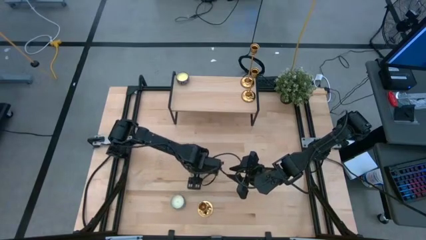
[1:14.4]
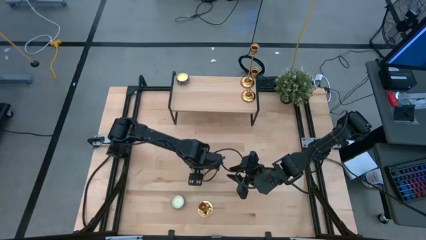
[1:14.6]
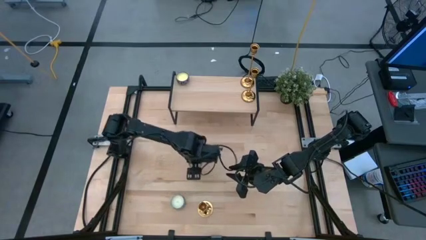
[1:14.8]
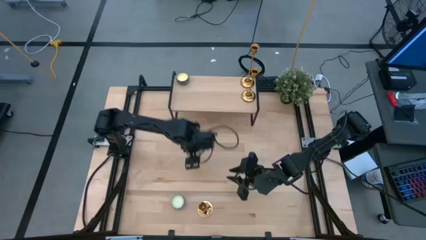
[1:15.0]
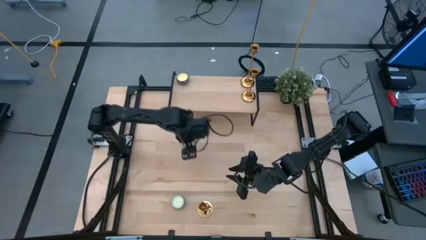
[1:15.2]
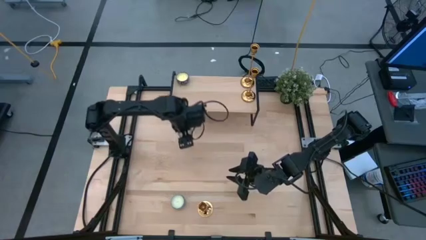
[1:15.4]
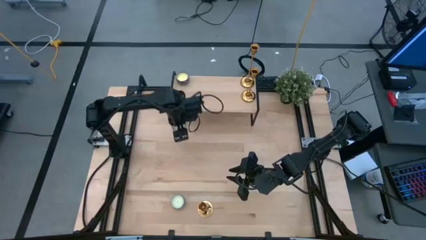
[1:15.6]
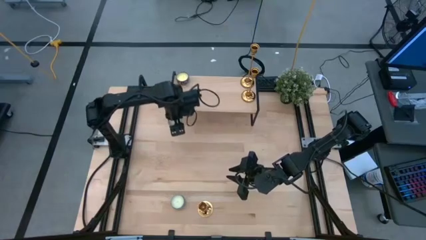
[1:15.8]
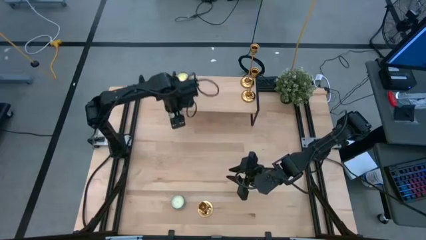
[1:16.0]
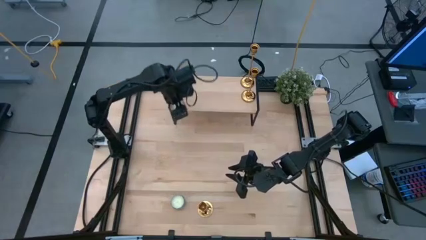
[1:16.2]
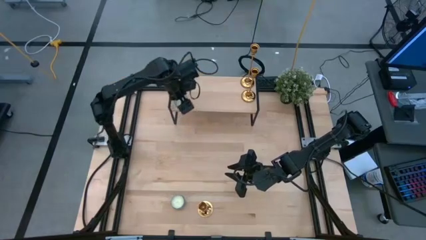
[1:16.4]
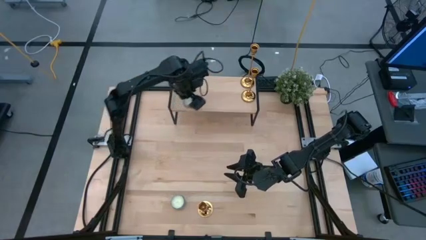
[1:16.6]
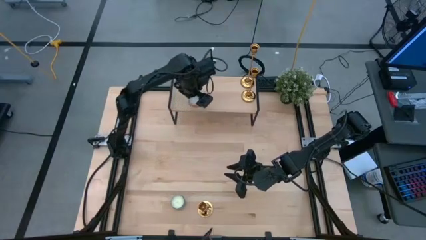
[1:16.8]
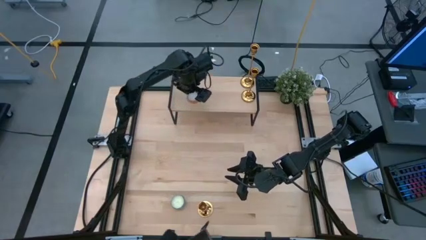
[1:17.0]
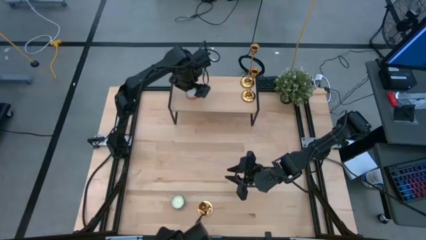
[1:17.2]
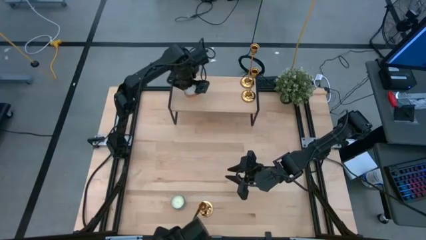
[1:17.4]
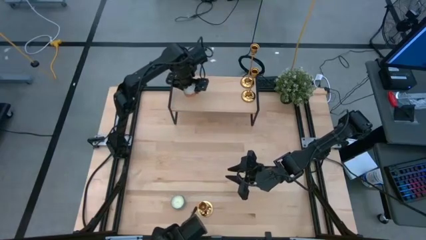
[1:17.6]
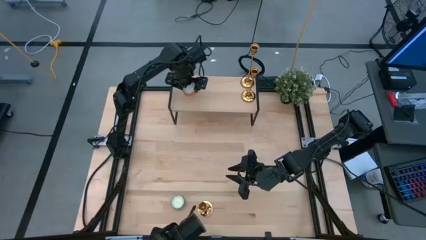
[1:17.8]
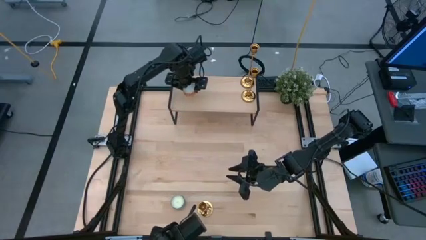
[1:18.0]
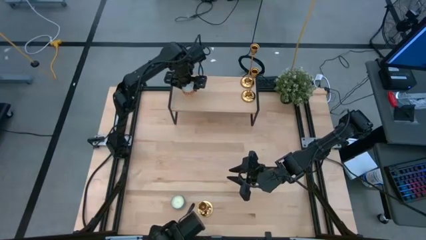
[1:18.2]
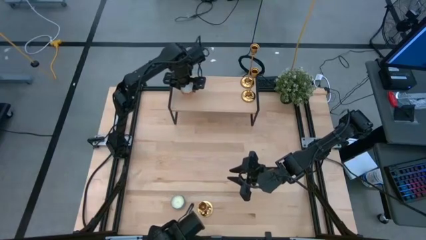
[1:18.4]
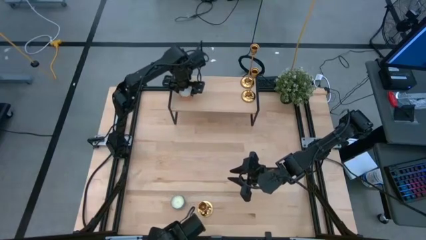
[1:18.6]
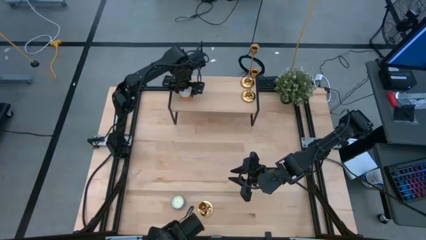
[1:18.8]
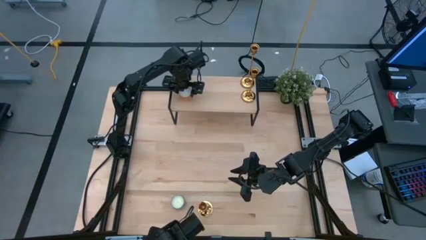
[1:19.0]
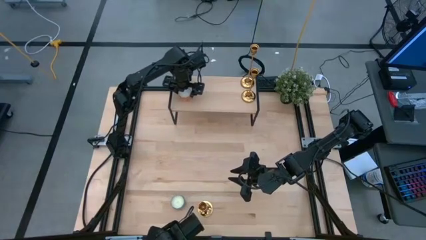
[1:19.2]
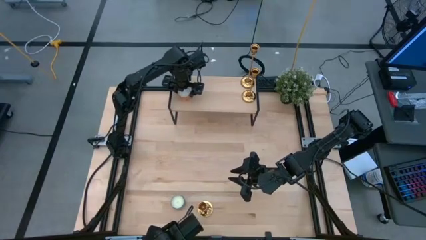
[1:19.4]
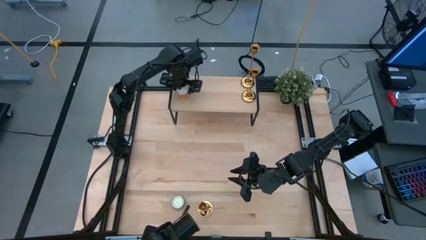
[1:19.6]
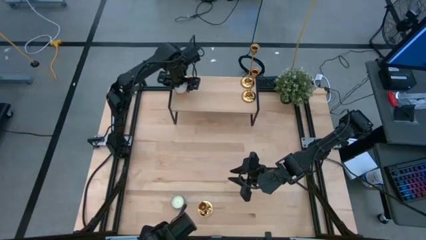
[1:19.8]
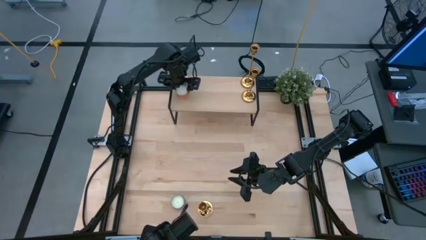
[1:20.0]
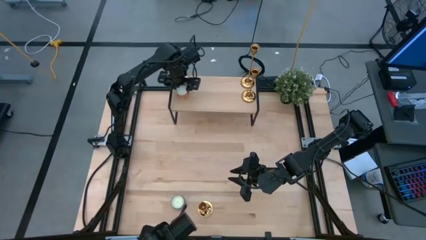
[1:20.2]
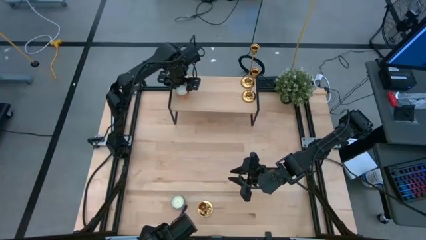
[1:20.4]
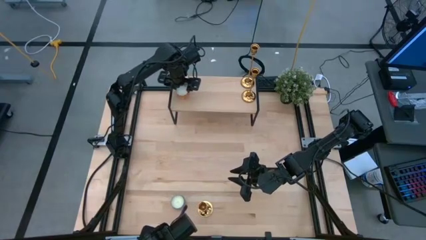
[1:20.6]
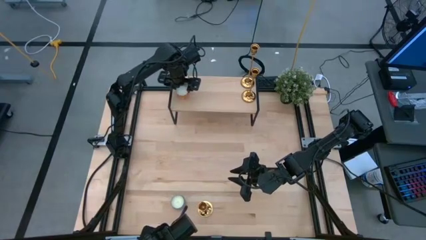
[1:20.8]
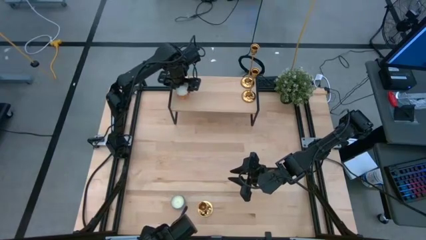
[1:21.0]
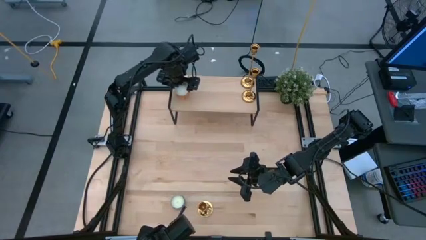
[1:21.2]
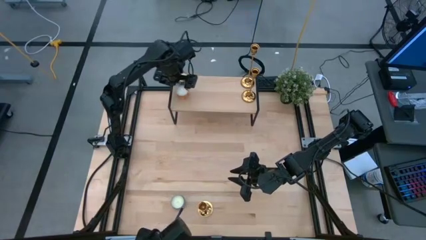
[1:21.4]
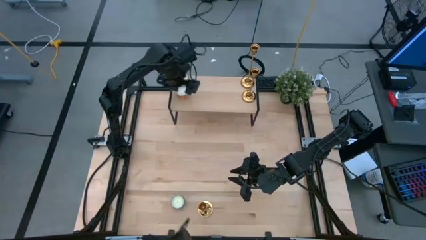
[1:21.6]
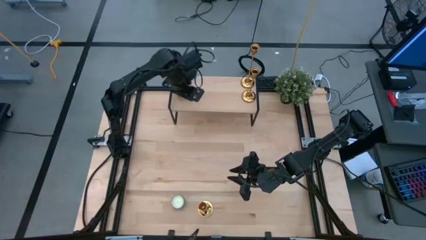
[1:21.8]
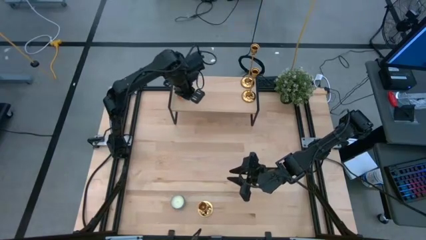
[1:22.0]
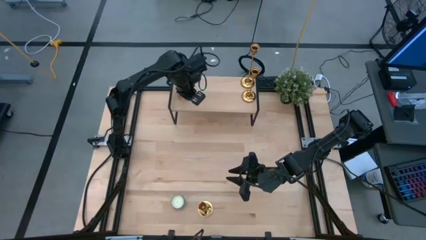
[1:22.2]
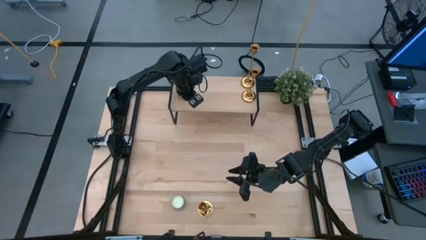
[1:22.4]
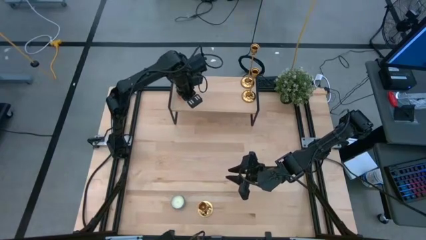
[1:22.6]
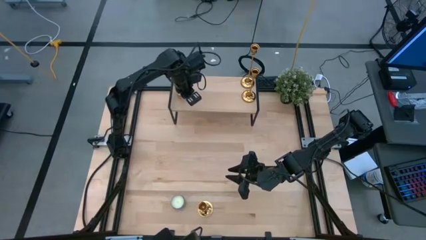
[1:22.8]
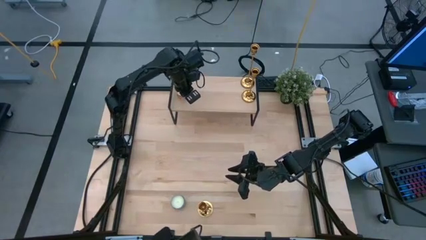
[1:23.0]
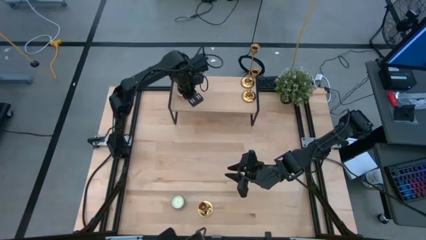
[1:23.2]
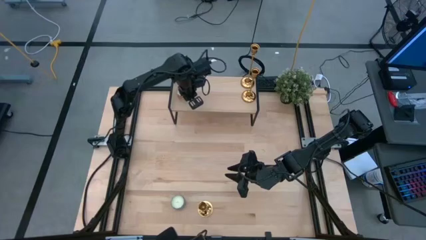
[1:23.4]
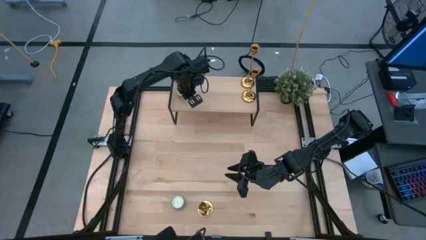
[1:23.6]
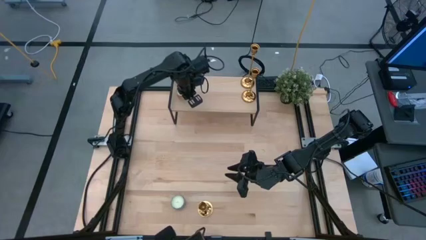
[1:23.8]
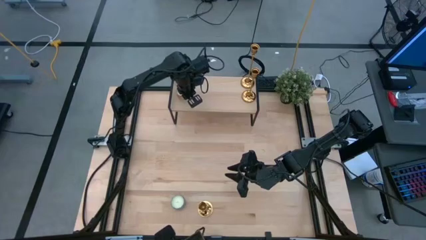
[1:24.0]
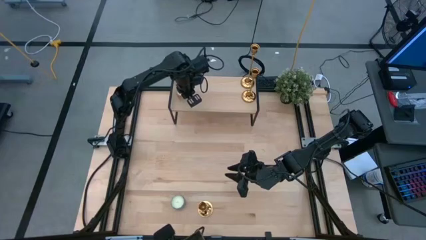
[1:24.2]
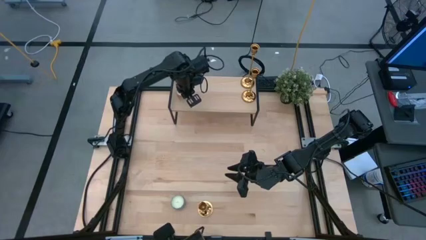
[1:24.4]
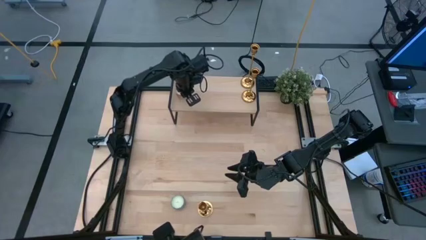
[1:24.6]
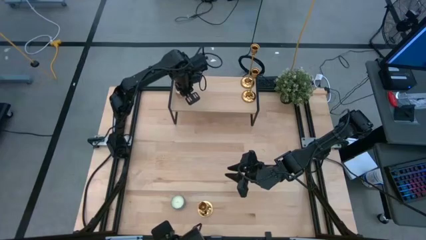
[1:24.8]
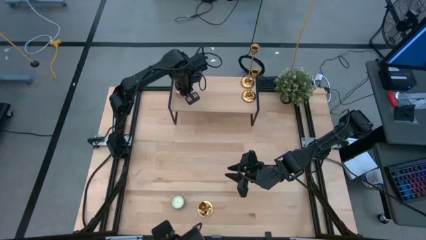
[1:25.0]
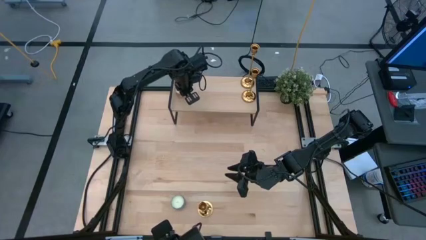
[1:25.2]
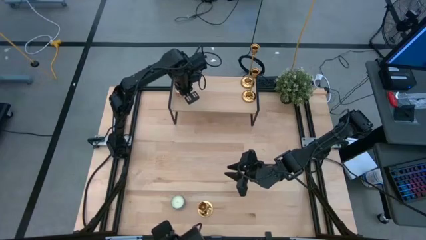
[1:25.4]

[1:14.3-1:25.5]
Task: Pick & Place candle stick holders
Put the yellow patterned scented candle on the shelf aligned with the black patterned scented candle
